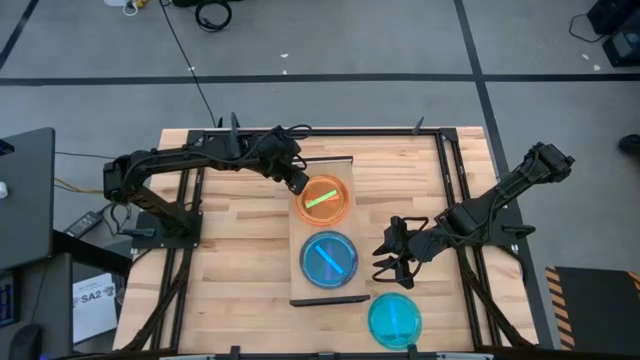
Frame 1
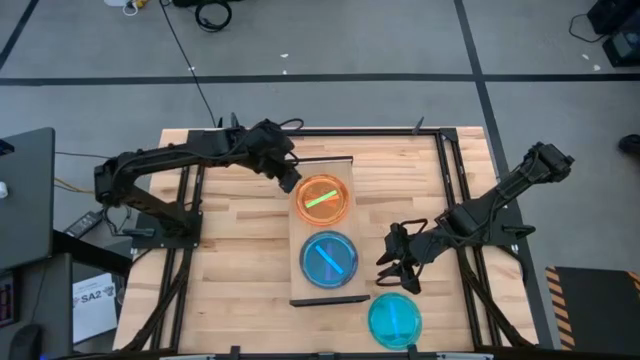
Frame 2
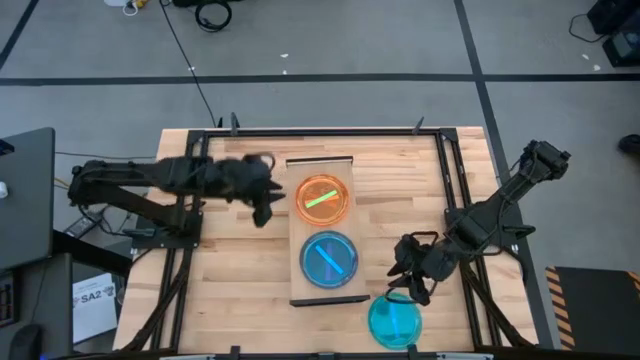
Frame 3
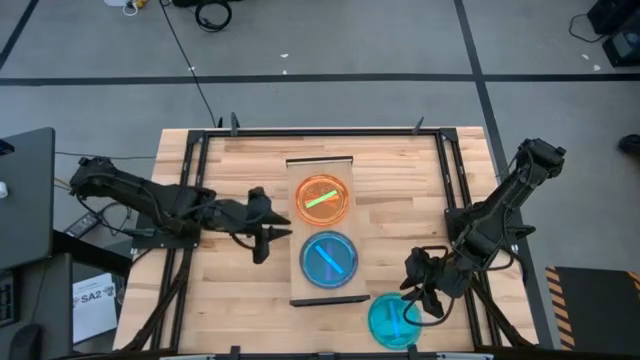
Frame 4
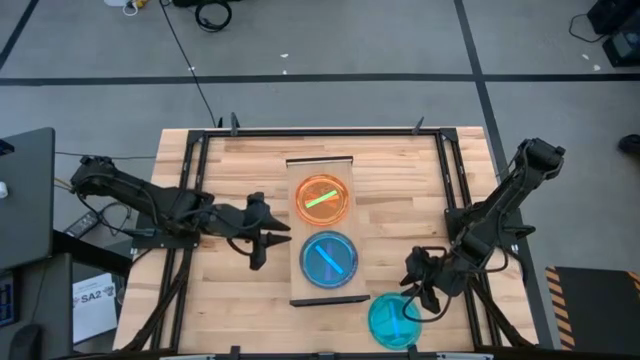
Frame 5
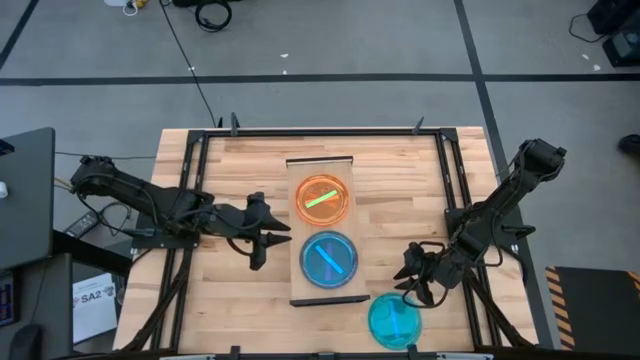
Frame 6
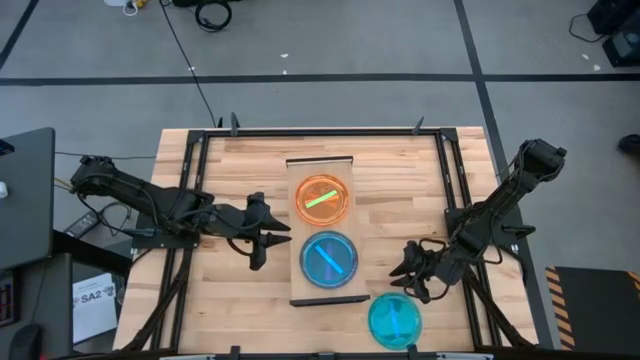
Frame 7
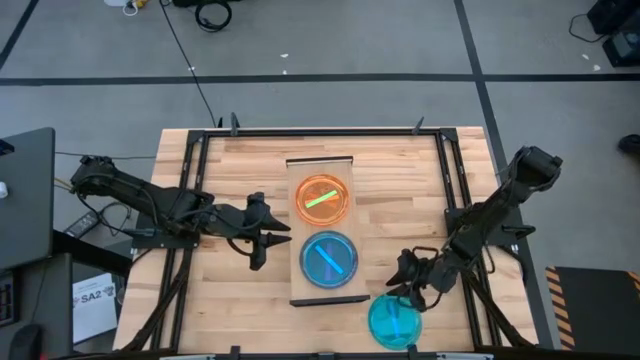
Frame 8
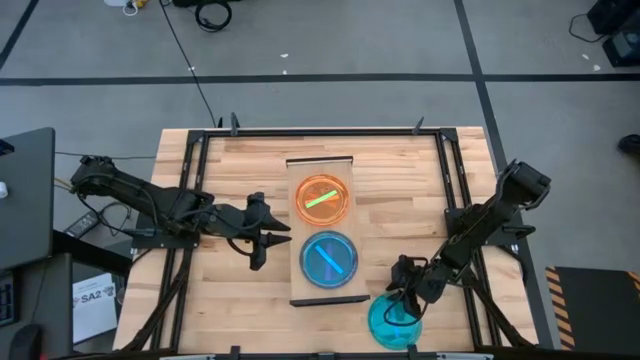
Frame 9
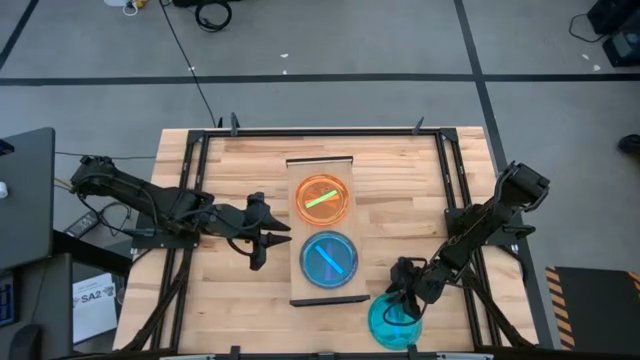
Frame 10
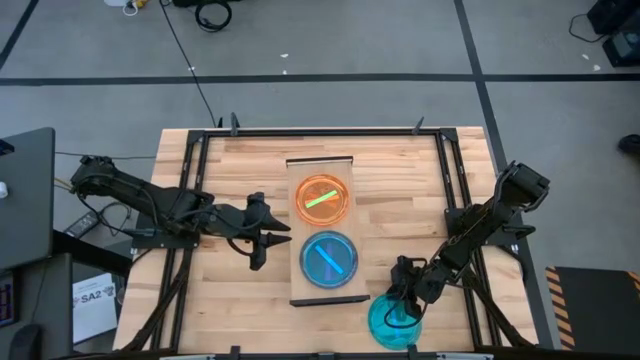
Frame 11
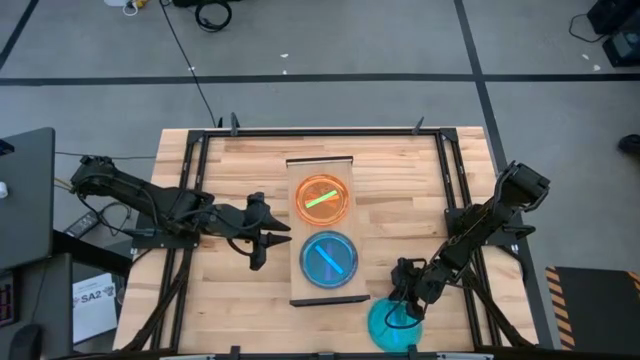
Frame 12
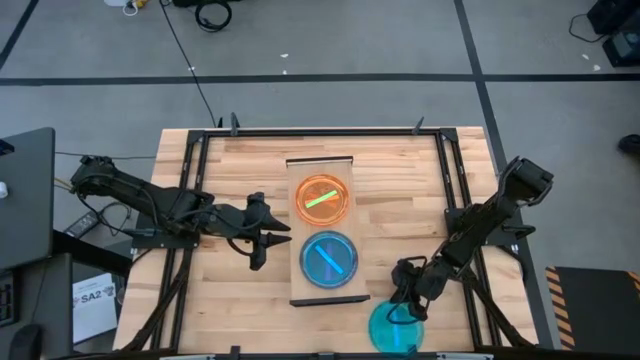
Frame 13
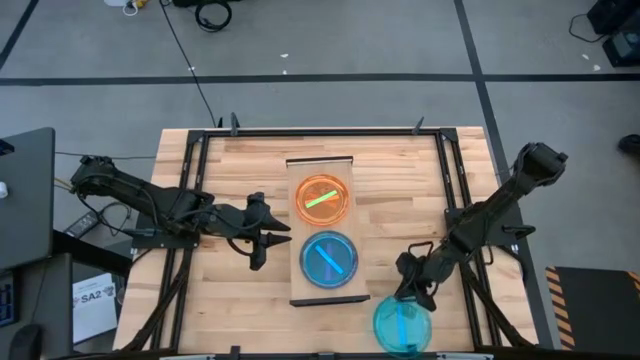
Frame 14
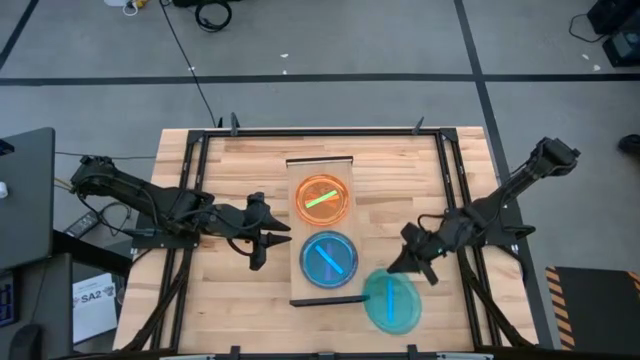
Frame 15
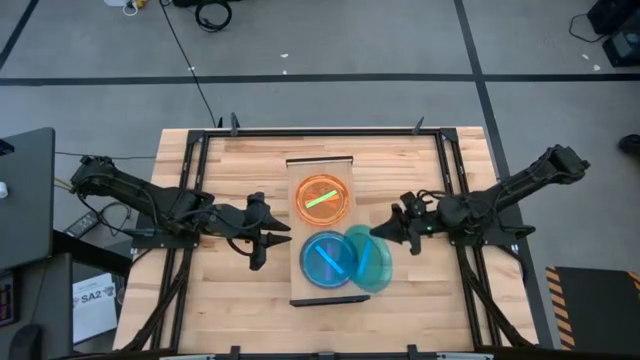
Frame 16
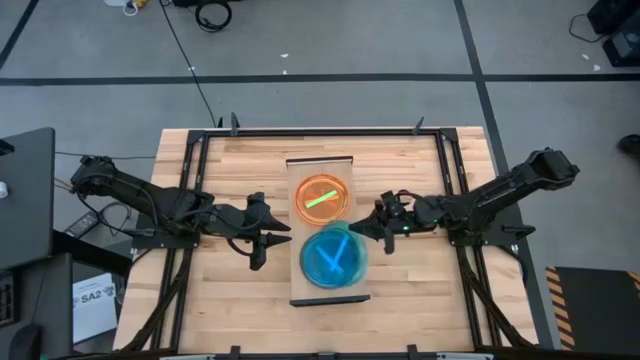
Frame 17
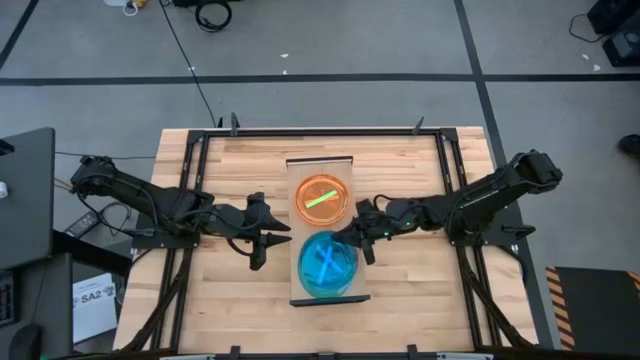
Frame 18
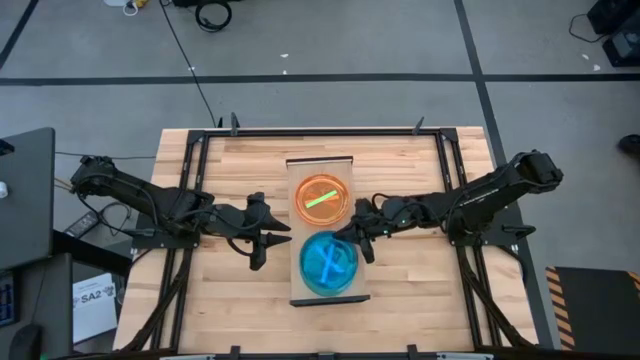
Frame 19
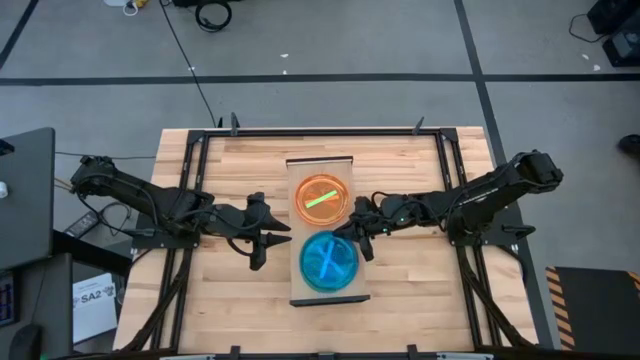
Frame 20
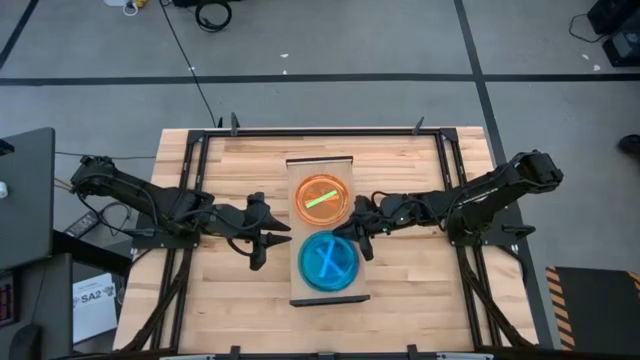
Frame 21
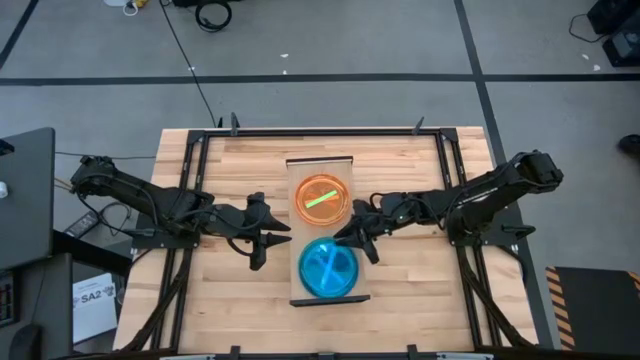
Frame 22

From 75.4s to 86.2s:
Task: Place and stack plates onto a shelf
Stack the blue plate on top of the blue plate on the shelf

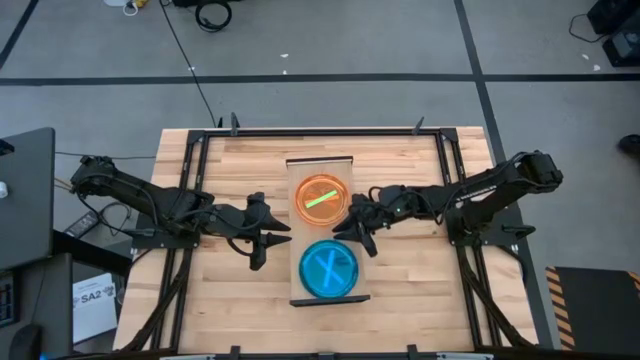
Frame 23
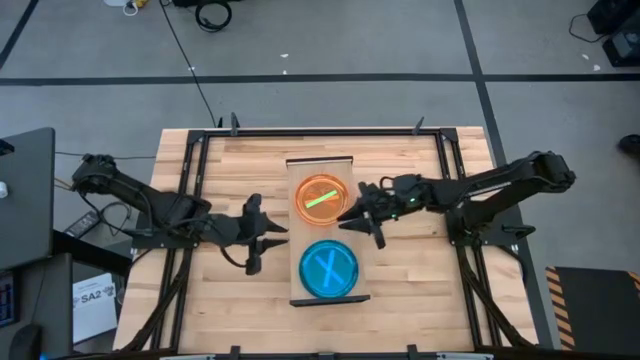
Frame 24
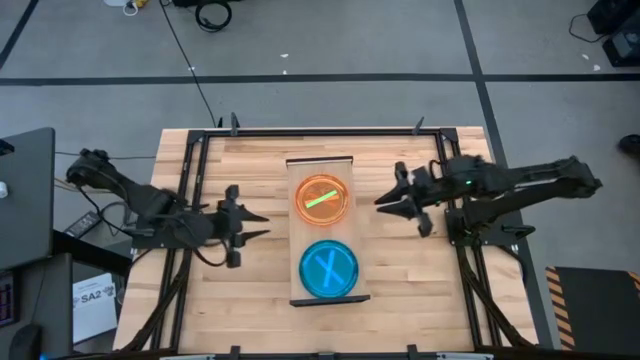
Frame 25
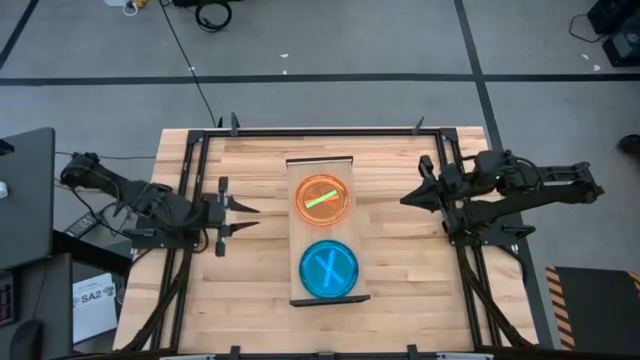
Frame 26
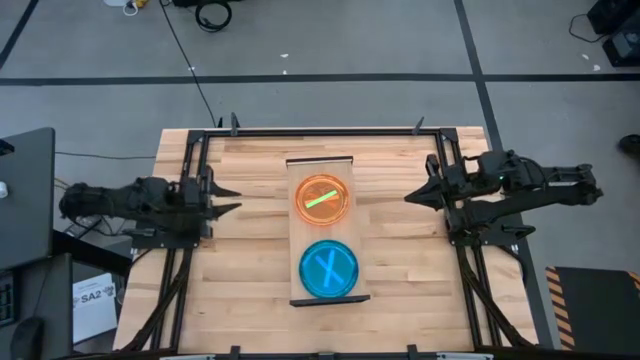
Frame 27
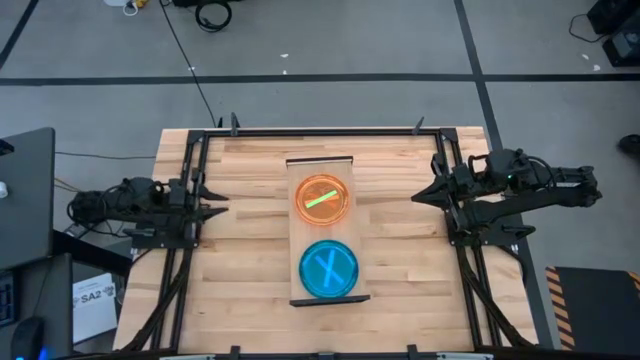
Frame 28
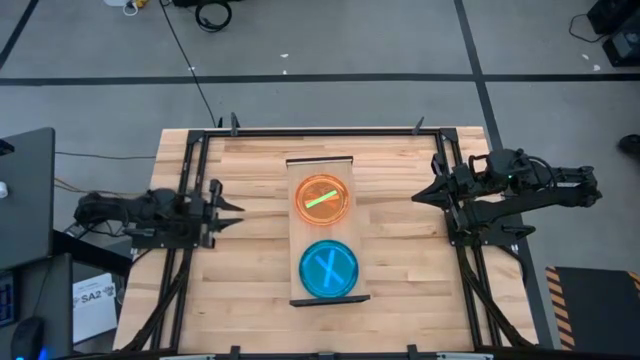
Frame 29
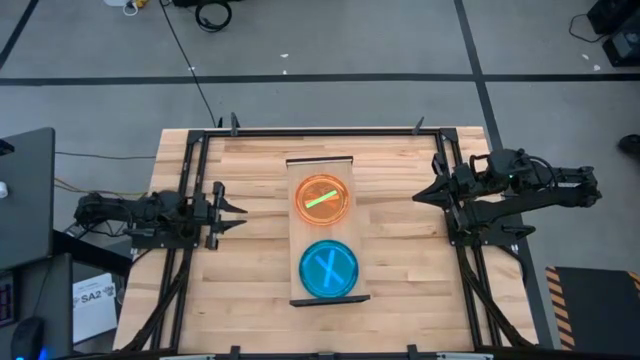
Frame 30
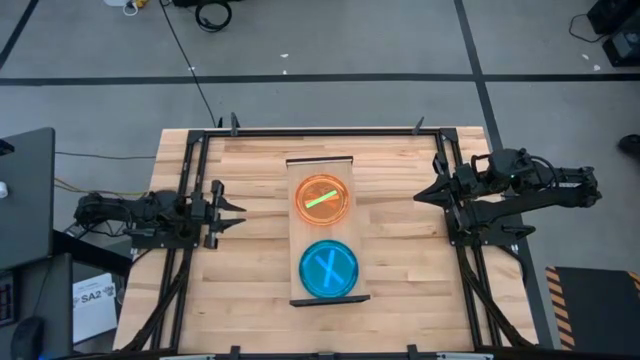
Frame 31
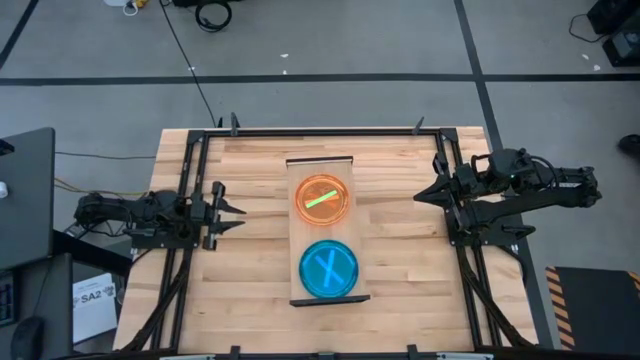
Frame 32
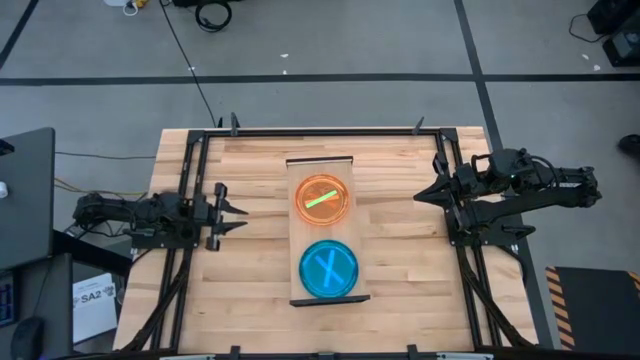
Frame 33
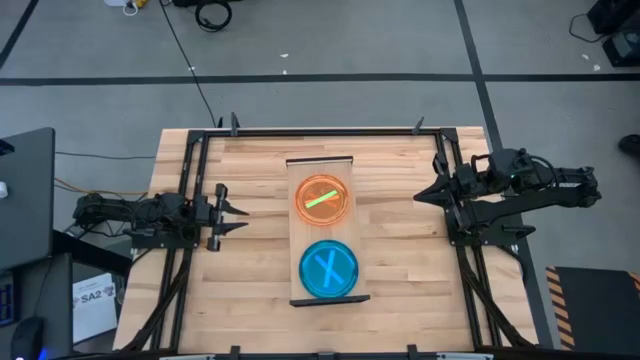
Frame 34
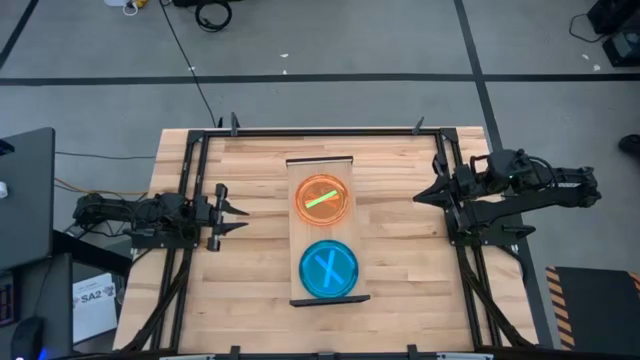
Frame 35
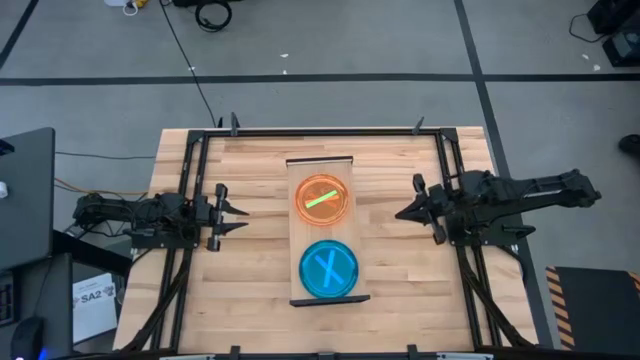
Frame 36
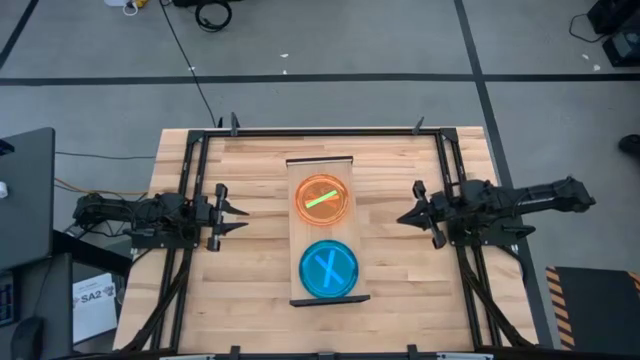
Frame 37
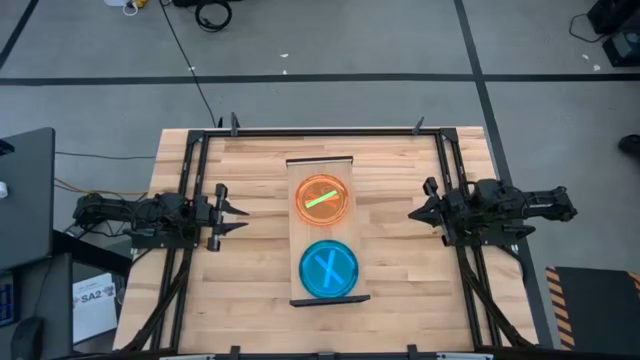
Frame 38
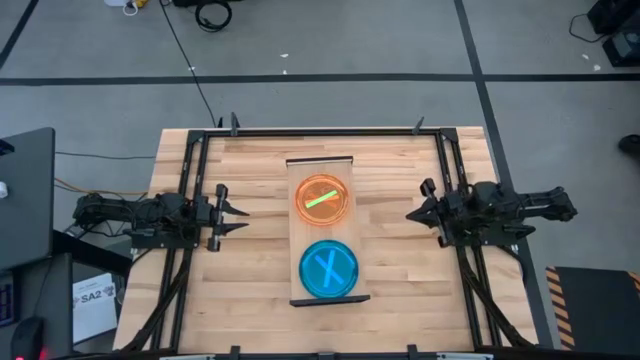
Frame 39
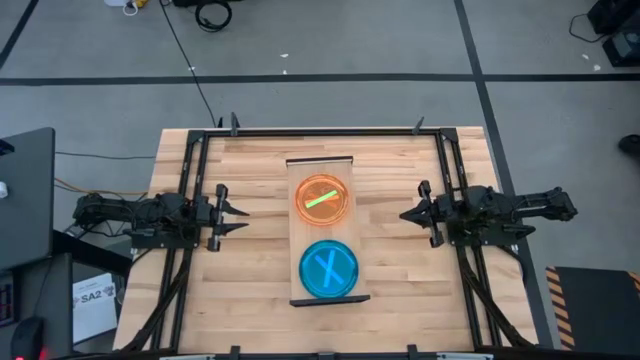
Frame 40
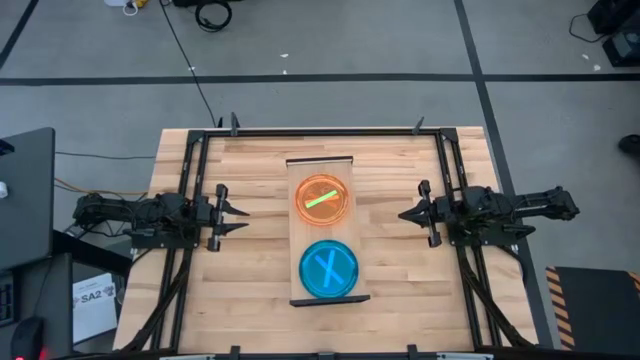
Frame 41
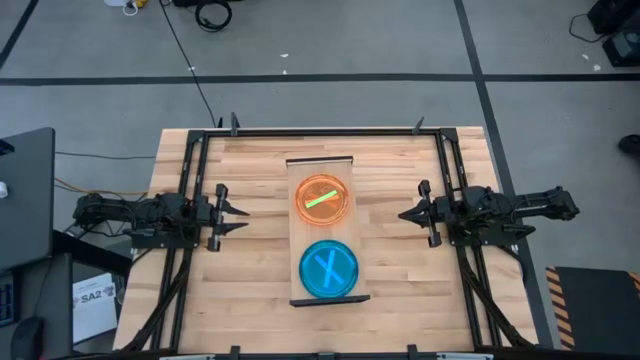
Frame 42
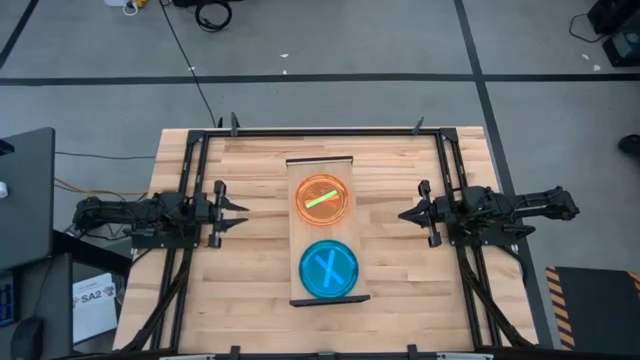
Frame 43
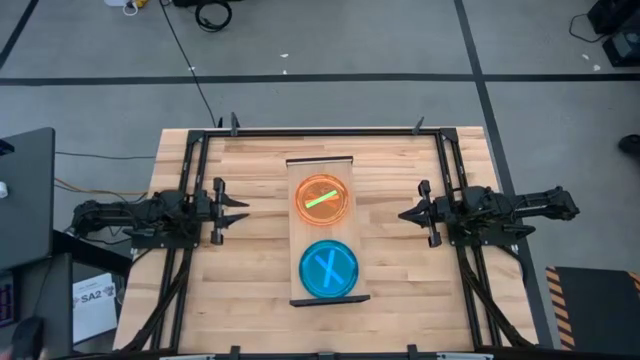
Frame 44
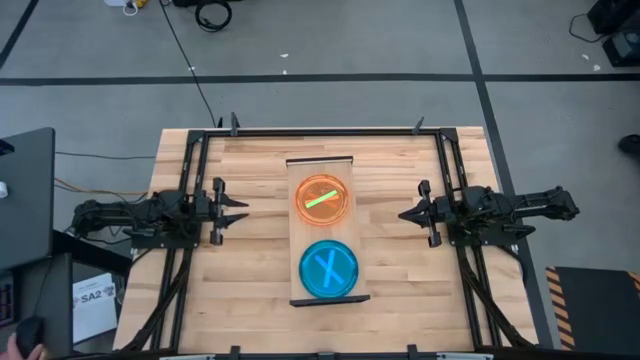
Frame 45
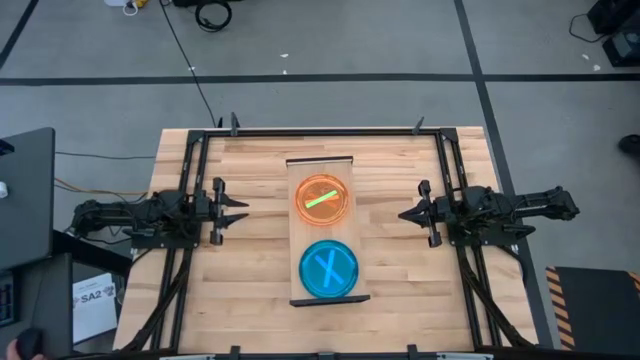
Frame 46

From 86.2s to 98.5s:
Return to Home Position
